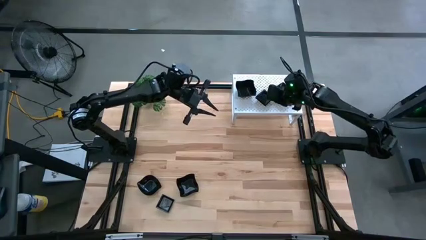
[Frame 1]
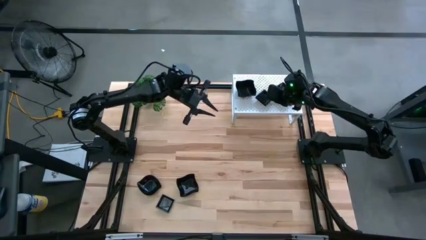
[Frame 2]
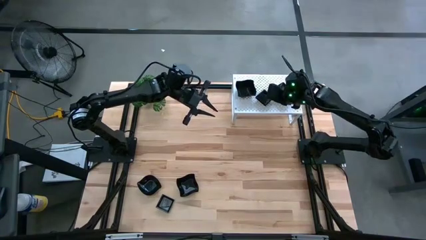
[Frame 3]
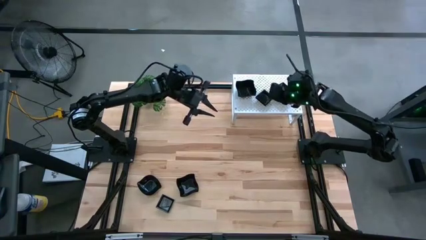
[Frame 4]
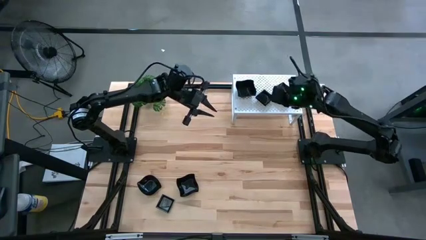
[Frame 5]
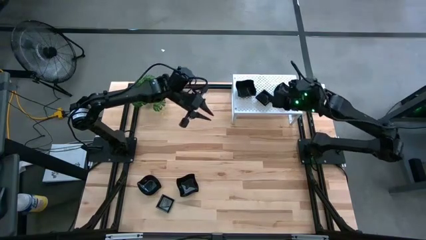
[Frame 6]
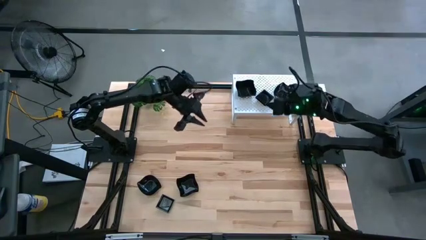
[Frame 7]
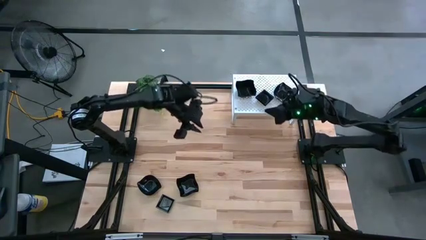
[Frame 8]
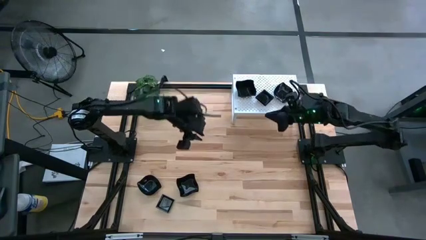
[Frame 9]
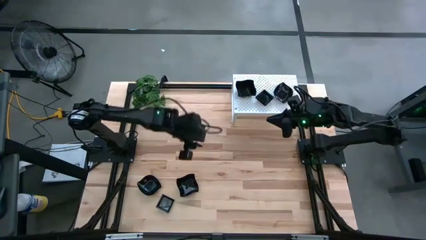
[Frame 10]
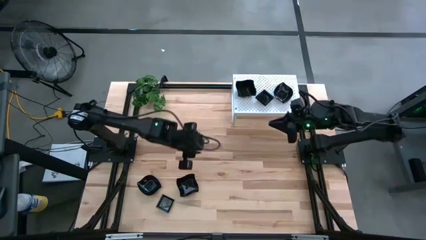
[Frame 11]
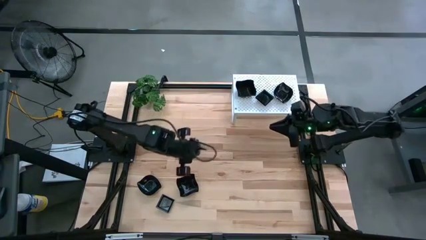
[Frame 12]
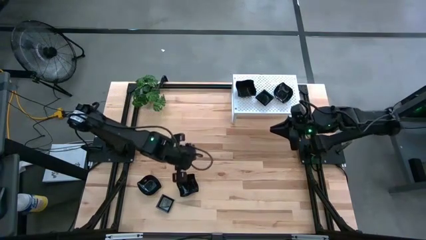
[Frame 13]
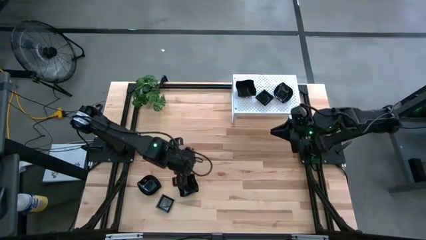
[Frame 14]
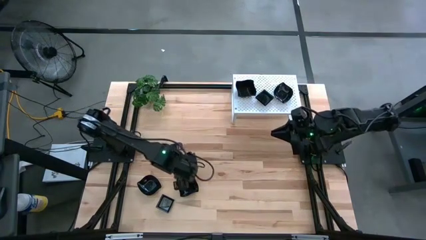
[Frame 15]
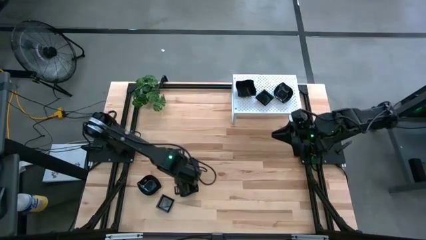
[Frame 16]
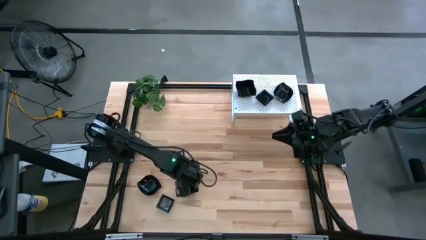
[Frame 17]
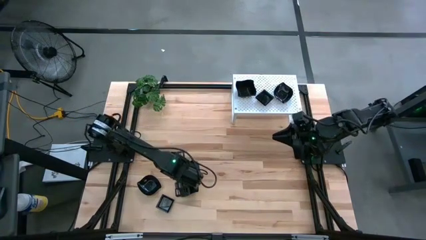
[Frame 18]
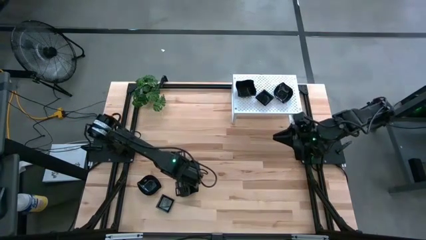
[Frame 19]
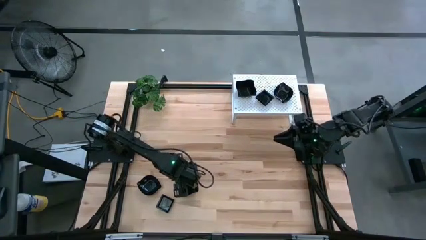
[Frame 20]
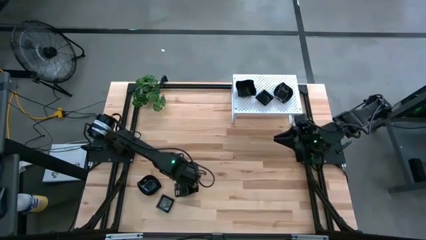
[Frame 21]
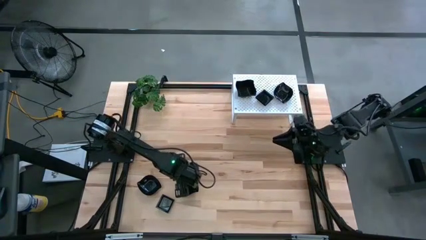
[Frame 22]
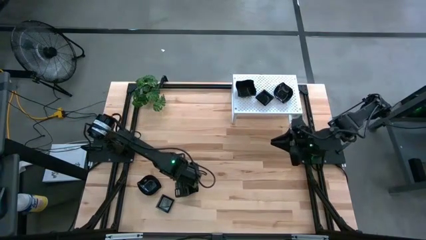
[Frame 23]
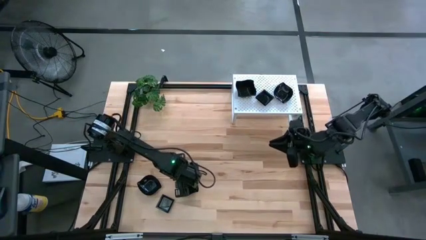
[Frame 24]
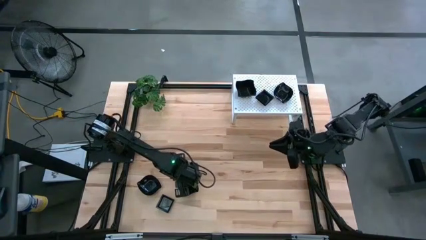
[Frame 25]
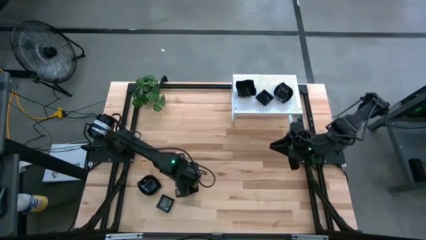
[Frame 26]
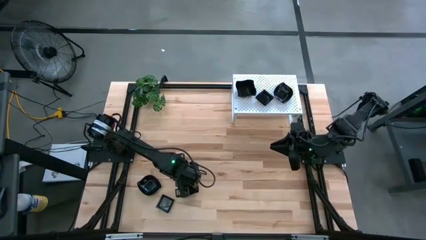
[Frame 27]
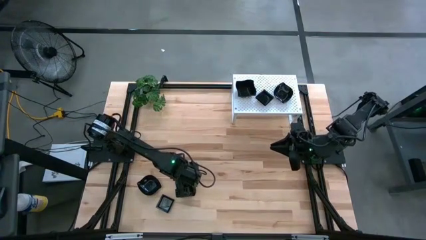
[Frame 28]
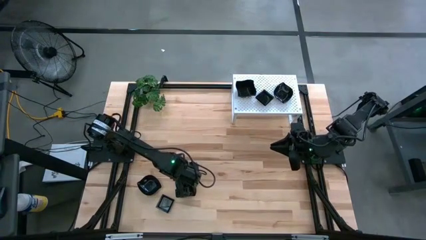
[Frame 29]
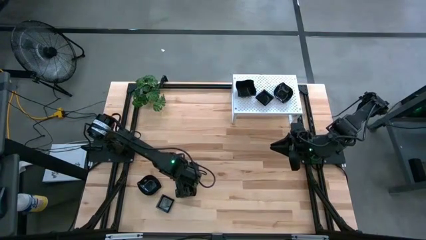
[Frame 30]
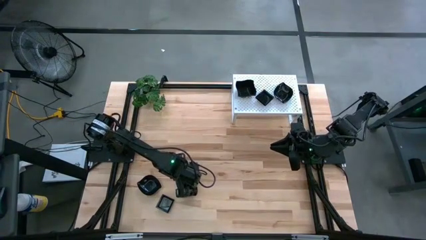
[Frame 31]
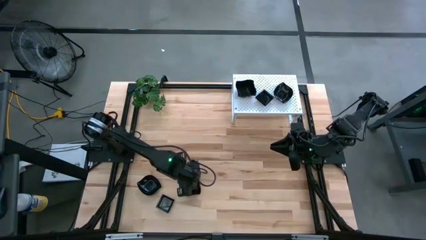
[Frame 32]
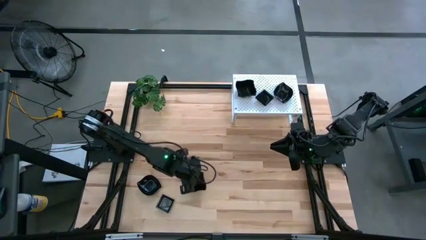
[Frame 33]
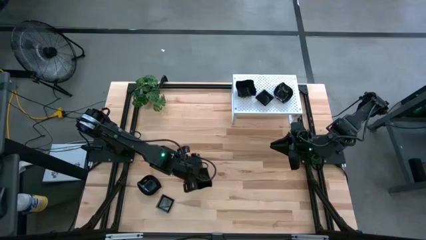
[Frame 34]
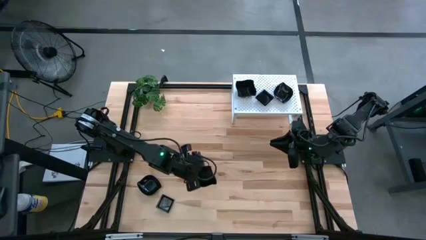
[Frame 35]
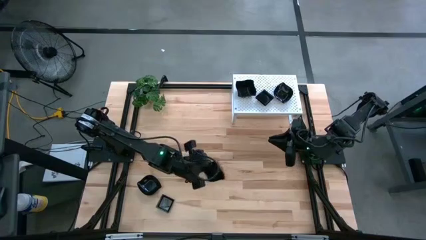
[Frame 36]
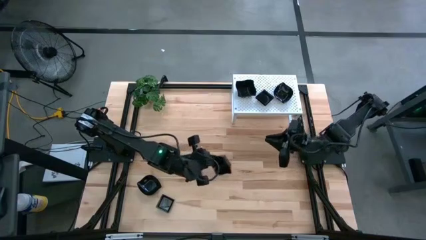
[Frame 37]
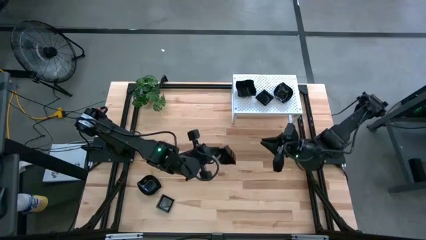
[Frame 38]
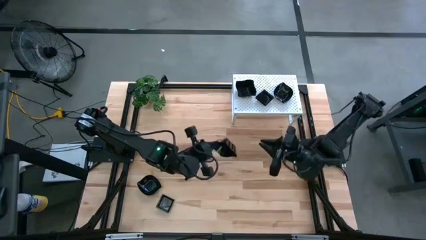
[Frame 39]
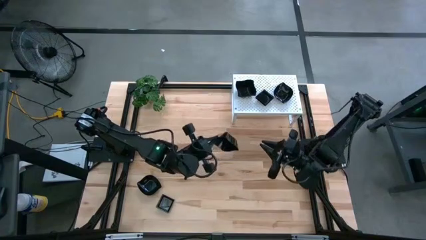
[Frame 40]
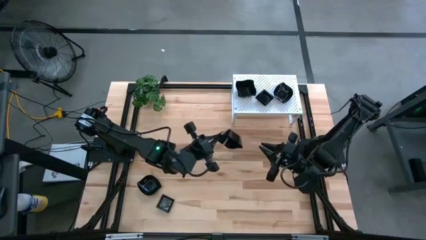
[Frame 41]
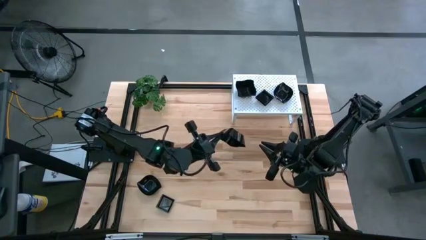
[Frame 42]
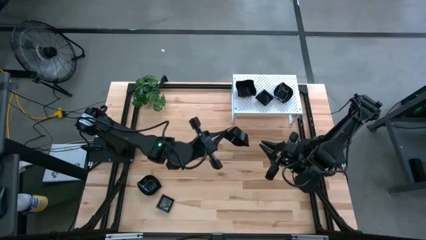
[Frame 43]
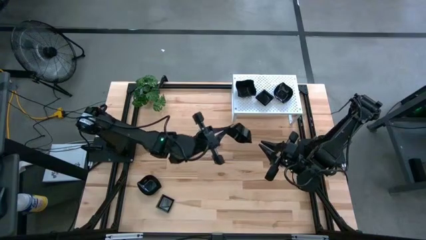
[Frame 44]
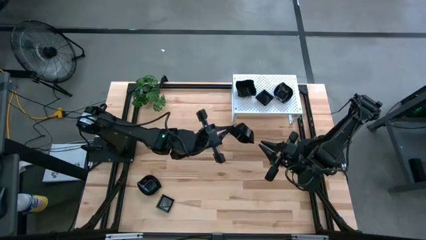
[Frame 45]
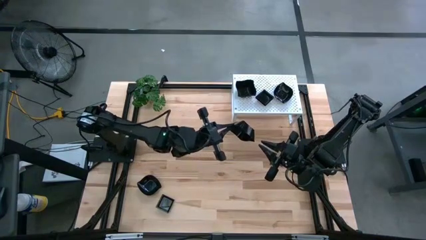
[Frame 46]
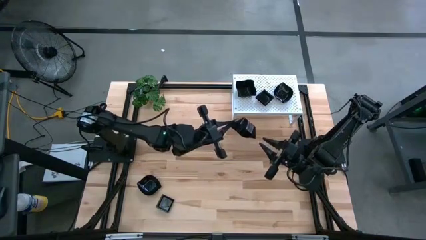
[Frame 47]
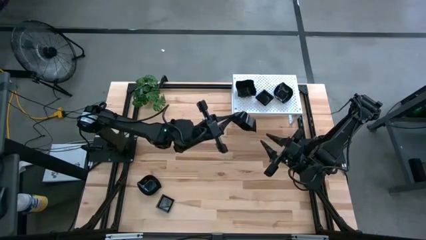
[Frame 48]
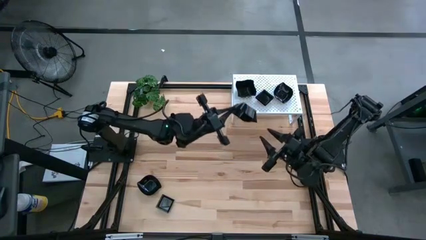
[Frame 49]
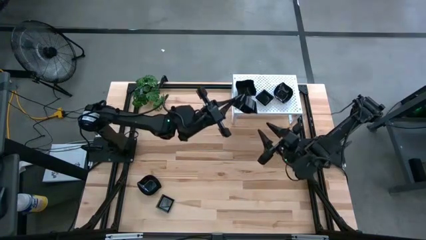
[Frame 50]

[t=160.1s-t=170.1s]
Task: Pick & Place Mini shaped plates
Stack the distorted square plate on top of the distorted square plate on the shelf

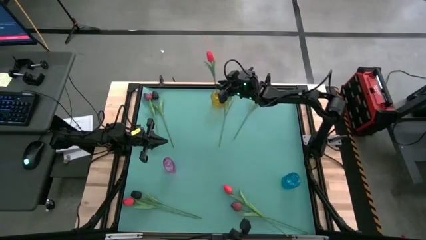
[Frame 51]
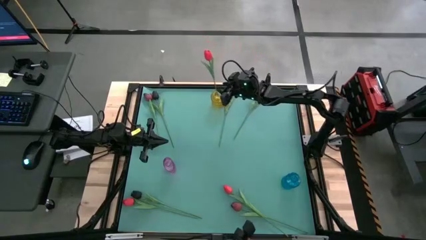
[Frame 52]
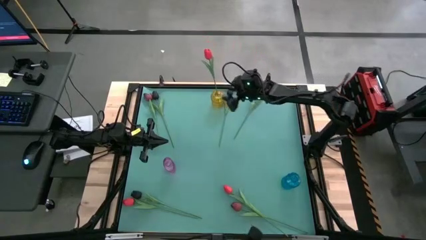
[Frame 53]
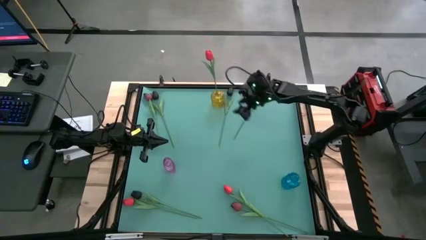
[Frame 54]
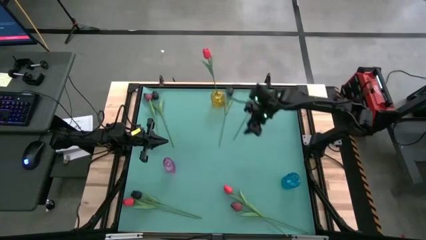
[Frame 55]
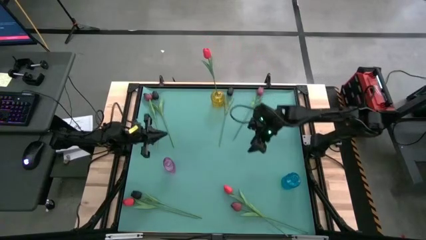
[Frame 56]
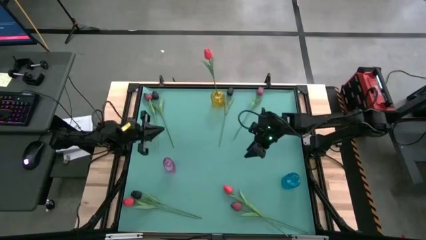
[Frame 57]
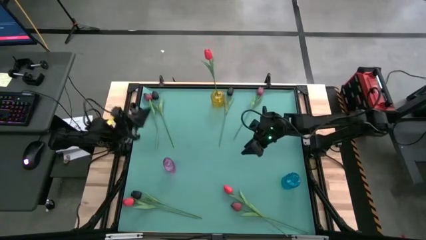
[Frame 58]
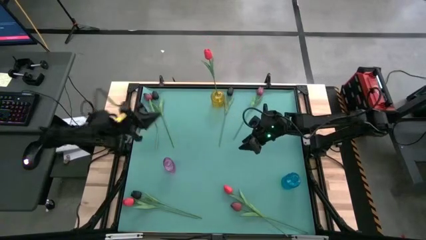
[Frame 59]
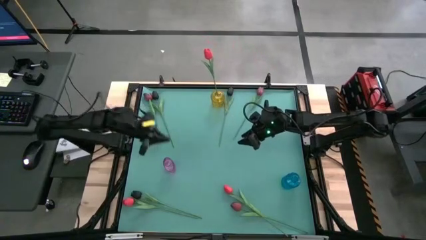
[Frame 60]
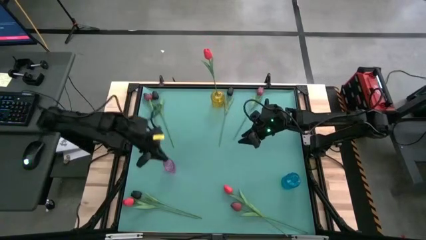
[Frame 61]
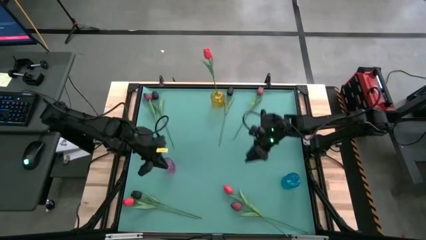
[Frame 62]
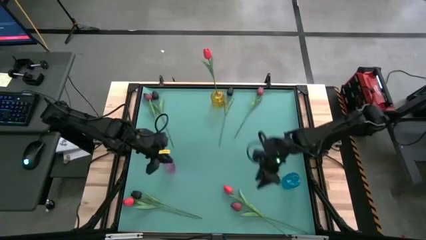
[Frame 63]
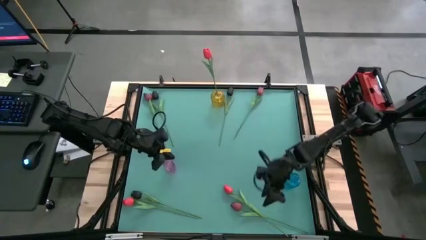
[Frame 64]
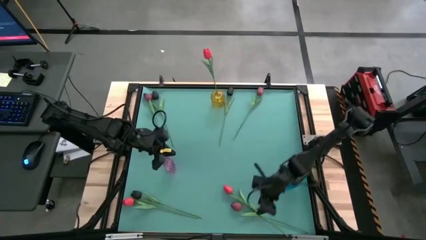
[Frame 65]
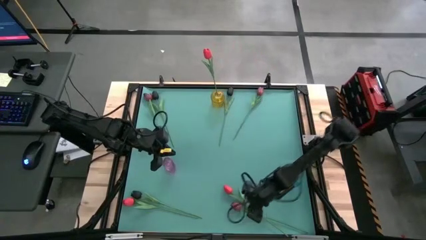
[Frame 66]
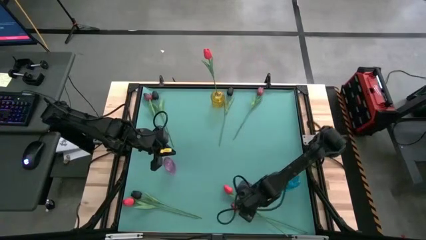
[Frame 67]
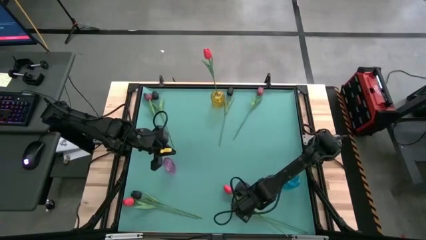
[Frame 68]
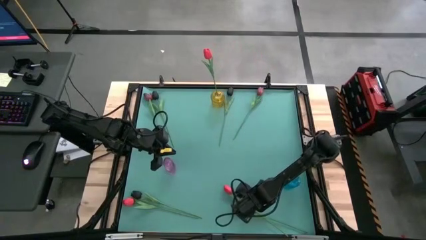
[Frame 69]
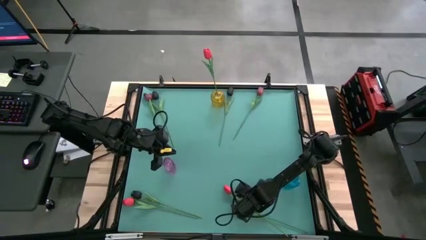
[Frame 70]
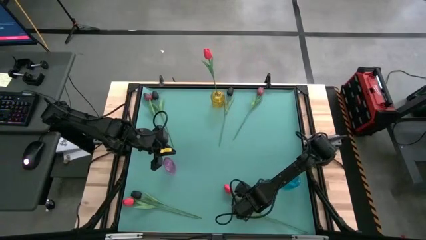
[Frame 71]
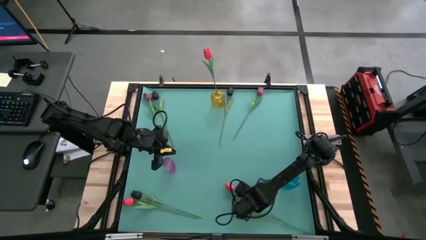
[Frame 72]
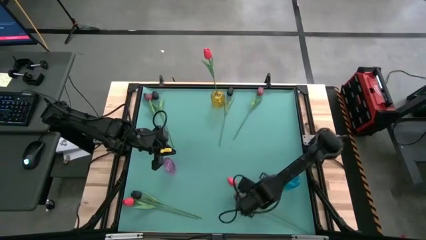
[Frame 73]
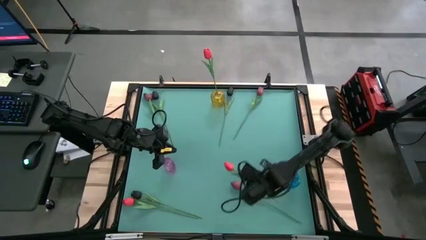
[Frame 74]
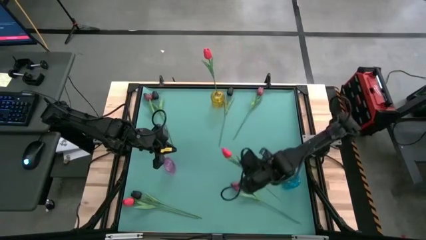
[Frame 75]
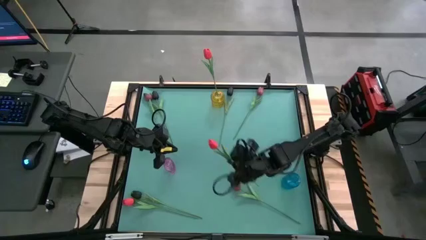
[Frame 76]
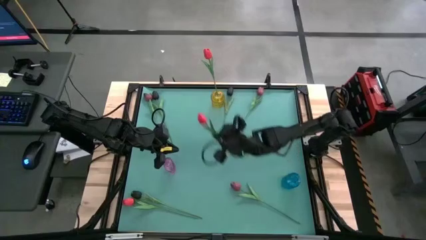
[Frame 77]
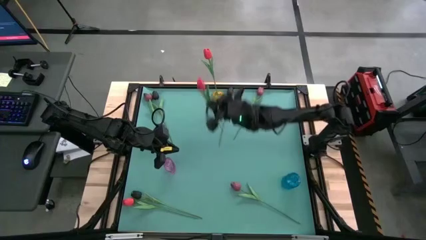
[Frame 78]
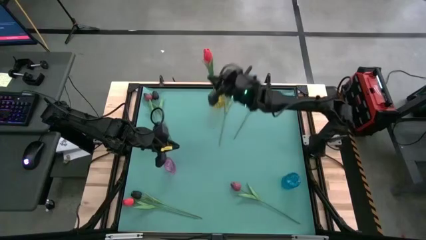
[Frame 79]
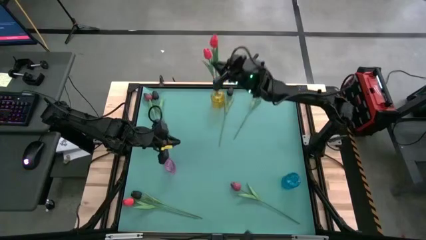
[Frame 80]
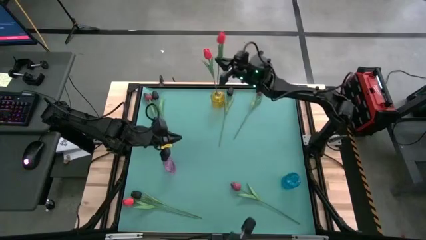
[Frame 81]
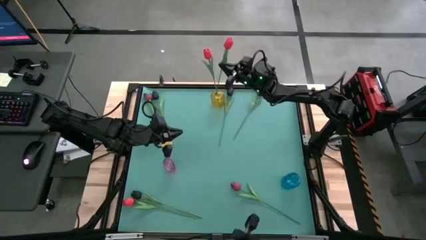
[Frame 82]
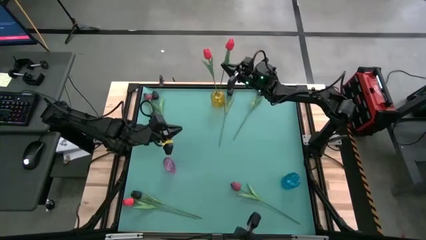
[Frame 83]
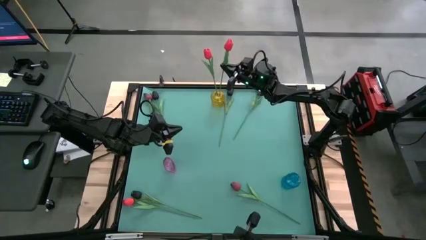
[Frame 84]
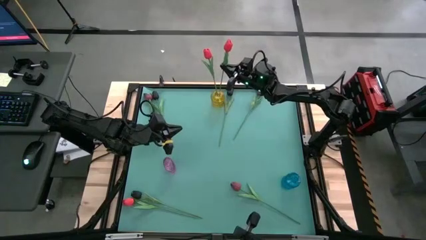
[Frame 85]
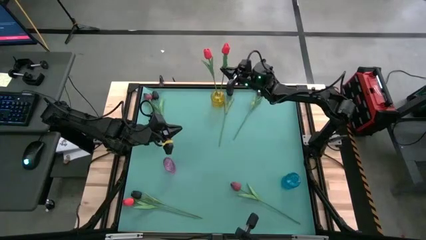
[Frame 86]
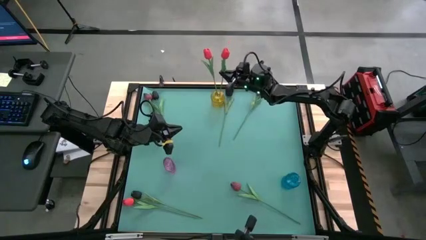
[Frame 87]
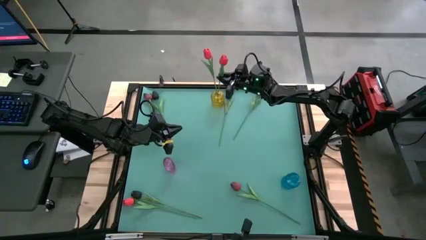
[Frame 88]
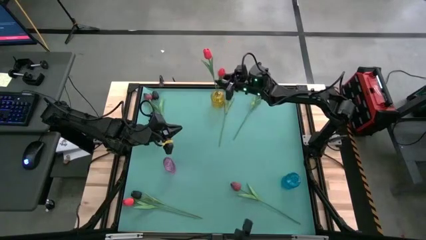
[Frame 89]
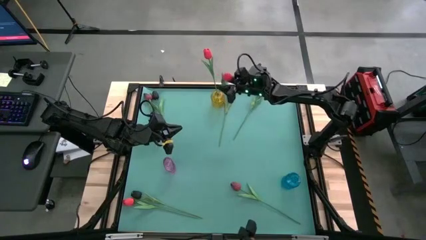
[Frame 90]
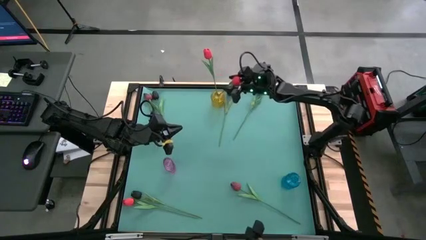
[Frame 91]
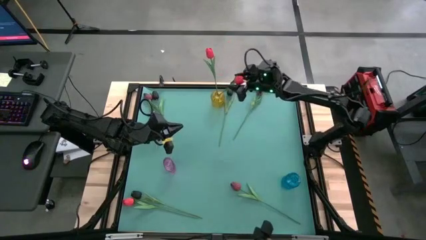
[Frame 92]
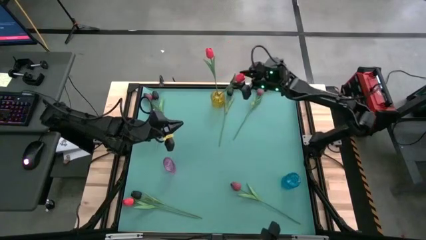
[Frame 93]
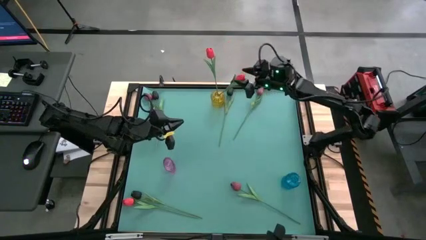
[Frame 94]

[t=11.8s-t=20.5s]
Task: Sort flowers into vase by color
Put the right red tulip into the yellow vase
